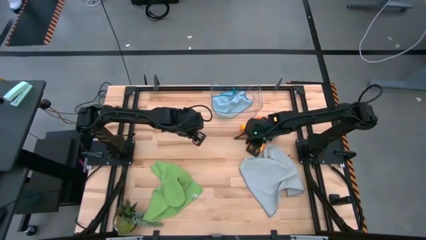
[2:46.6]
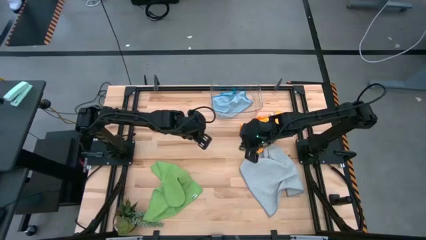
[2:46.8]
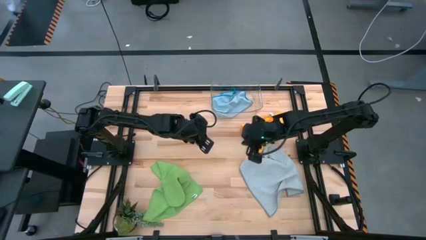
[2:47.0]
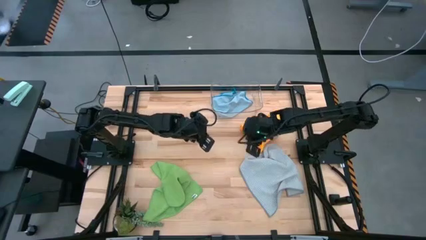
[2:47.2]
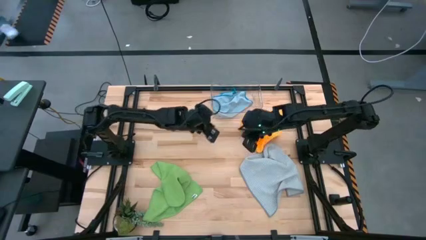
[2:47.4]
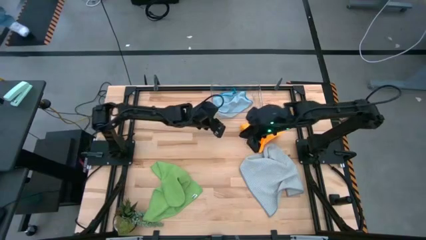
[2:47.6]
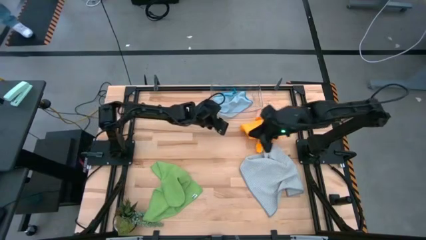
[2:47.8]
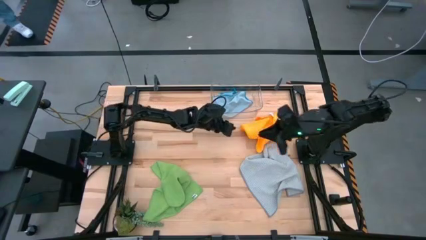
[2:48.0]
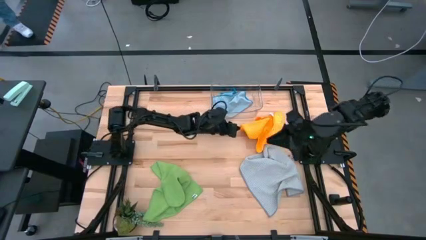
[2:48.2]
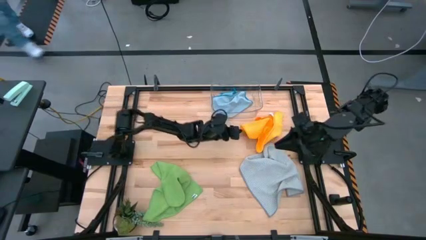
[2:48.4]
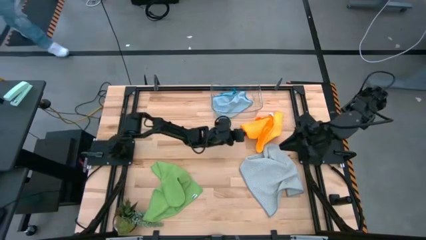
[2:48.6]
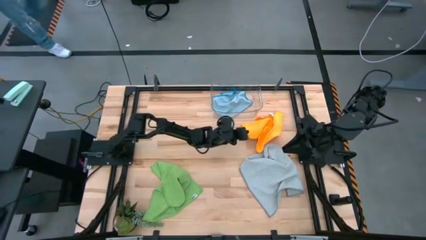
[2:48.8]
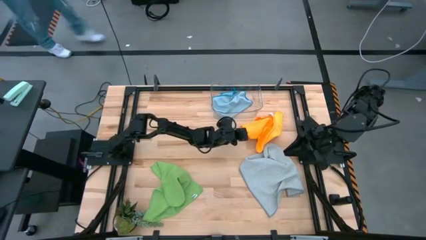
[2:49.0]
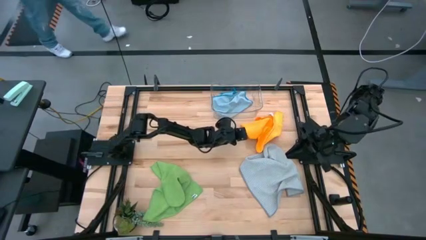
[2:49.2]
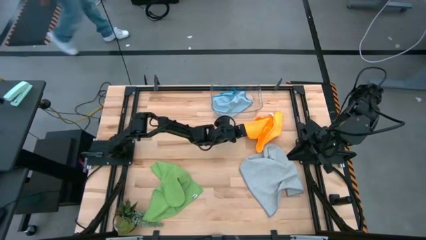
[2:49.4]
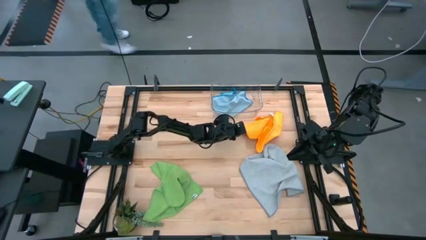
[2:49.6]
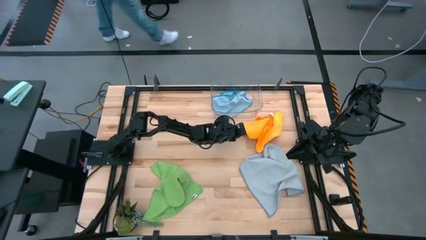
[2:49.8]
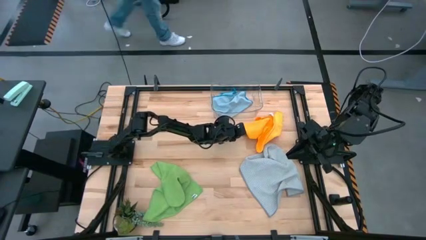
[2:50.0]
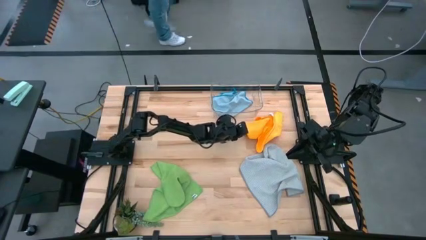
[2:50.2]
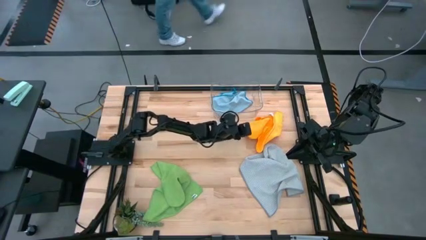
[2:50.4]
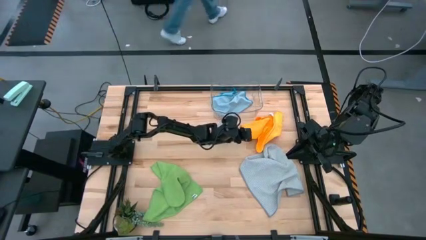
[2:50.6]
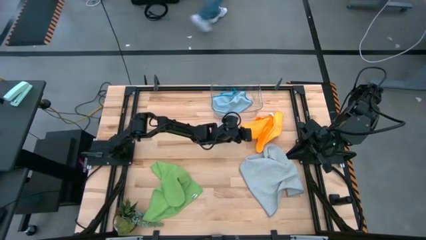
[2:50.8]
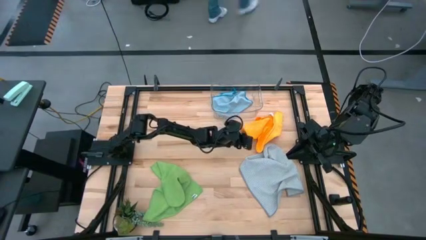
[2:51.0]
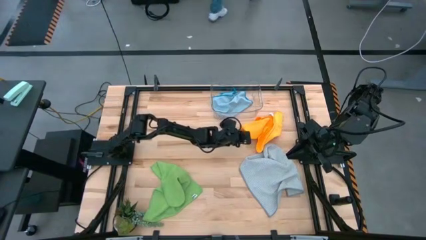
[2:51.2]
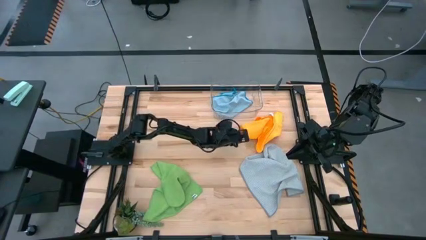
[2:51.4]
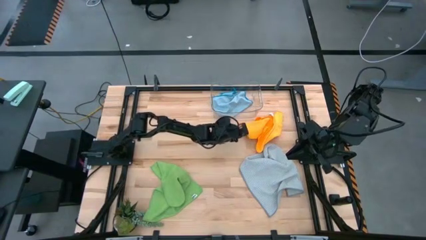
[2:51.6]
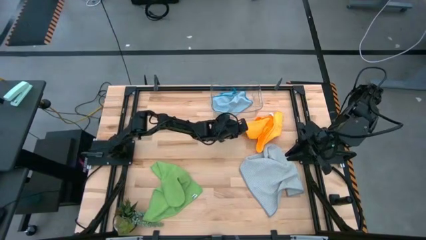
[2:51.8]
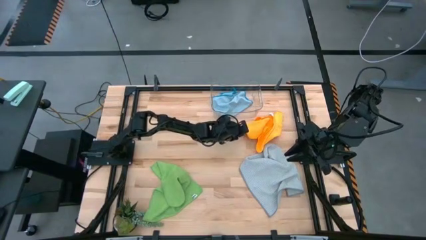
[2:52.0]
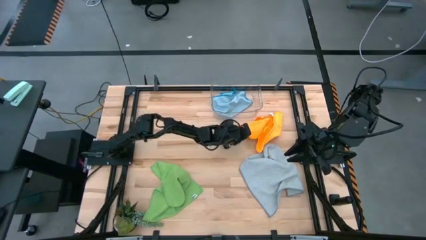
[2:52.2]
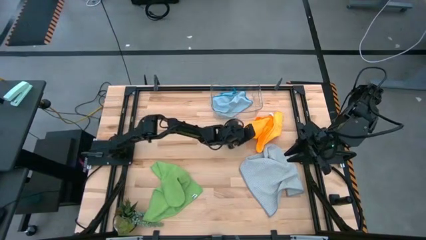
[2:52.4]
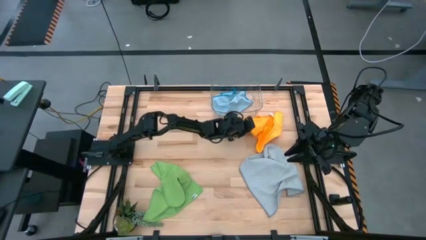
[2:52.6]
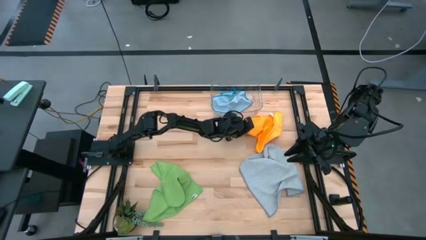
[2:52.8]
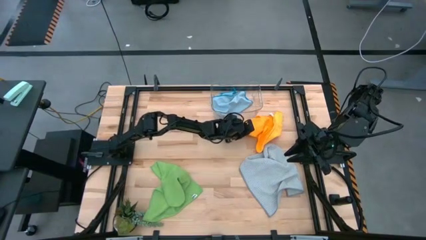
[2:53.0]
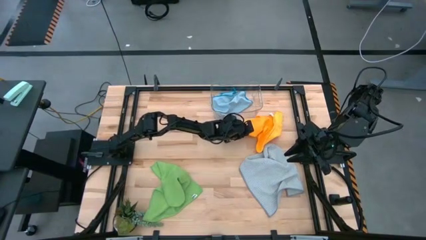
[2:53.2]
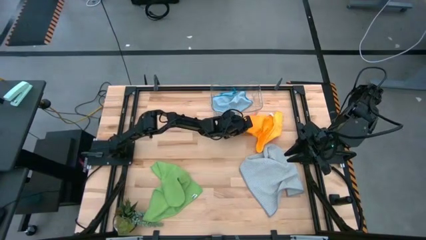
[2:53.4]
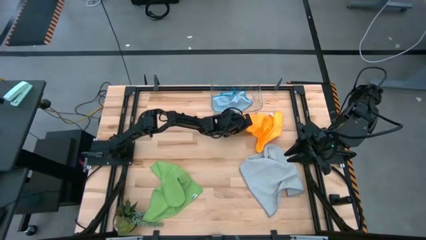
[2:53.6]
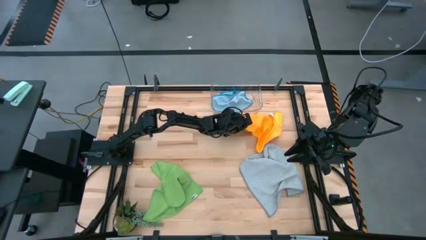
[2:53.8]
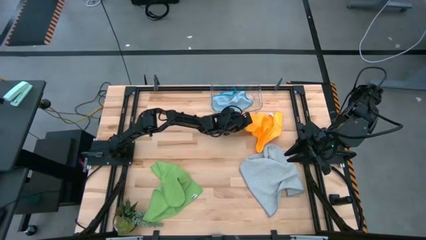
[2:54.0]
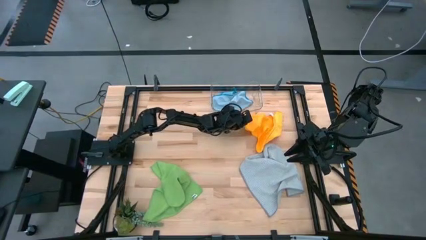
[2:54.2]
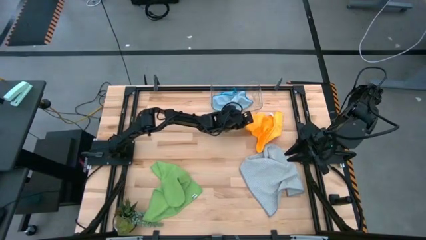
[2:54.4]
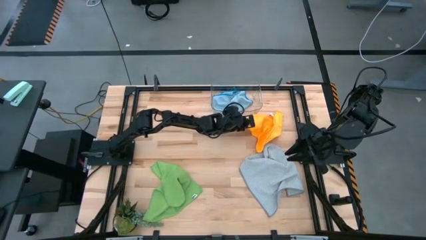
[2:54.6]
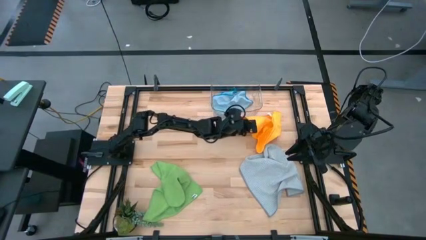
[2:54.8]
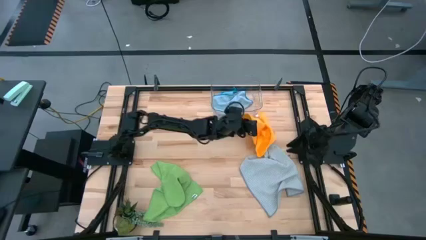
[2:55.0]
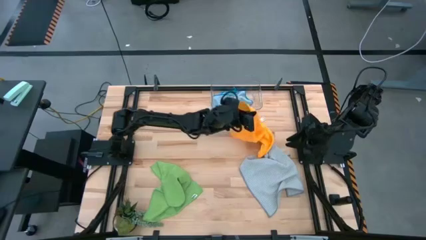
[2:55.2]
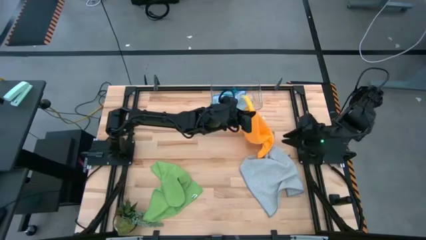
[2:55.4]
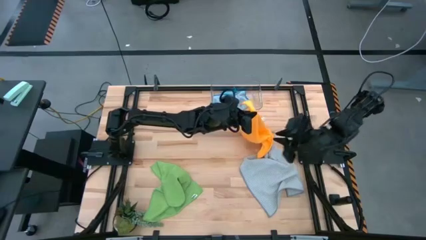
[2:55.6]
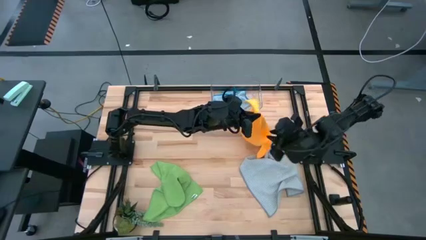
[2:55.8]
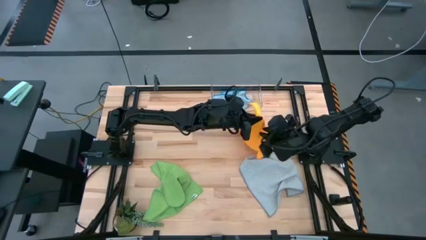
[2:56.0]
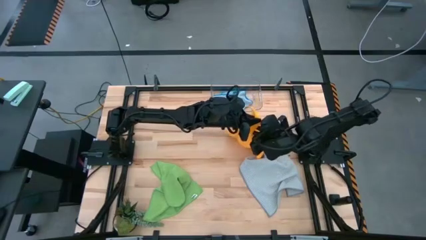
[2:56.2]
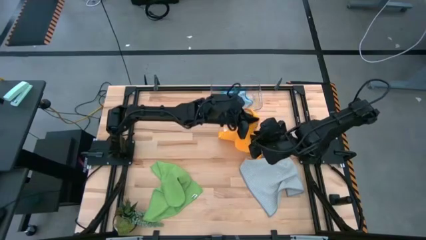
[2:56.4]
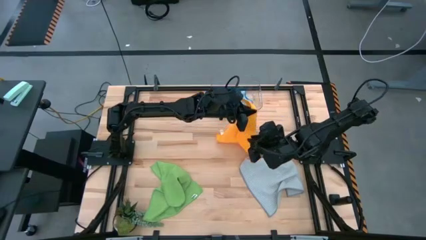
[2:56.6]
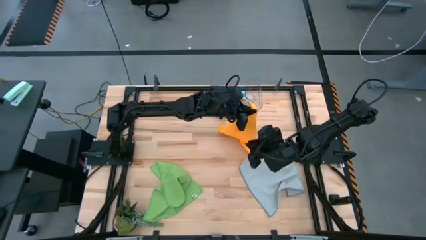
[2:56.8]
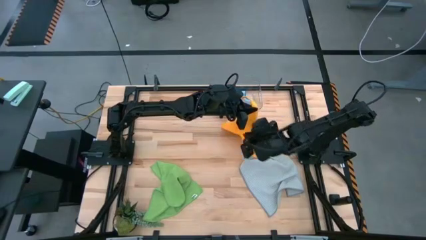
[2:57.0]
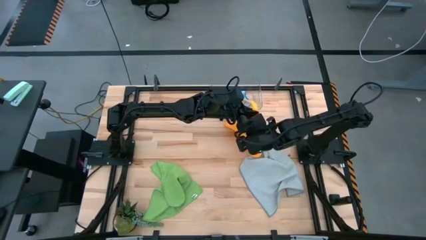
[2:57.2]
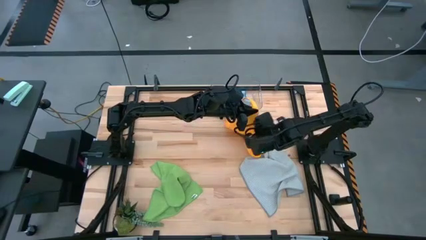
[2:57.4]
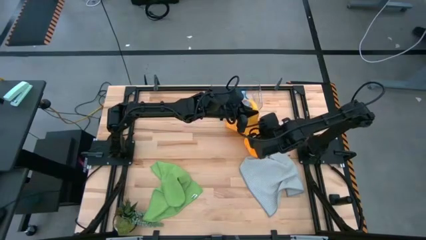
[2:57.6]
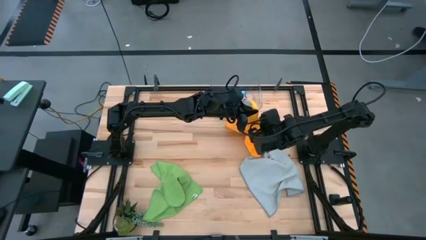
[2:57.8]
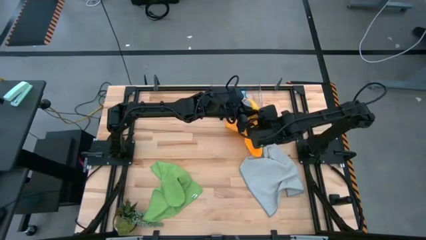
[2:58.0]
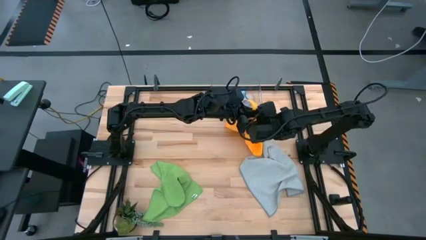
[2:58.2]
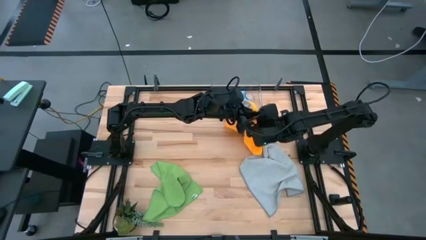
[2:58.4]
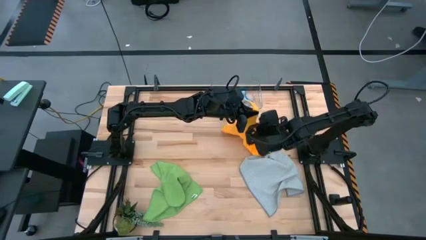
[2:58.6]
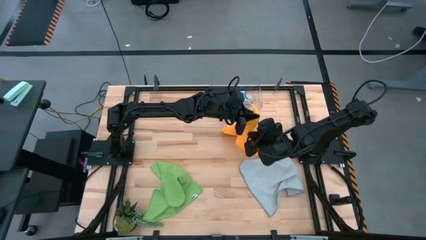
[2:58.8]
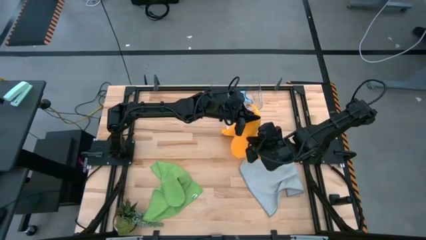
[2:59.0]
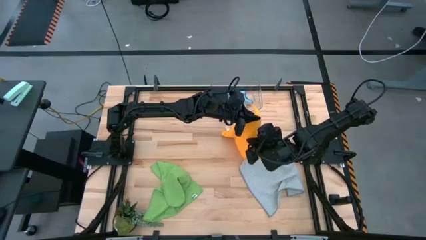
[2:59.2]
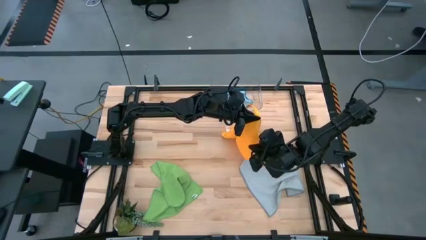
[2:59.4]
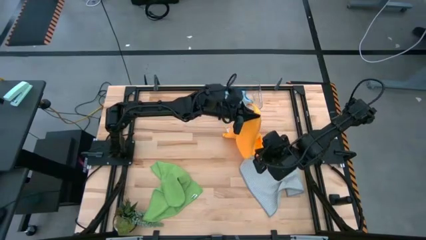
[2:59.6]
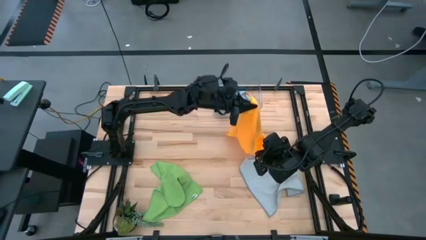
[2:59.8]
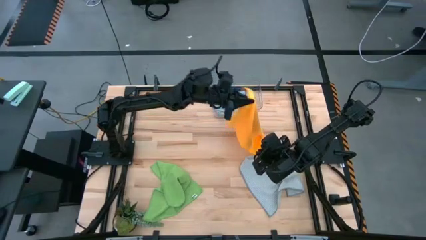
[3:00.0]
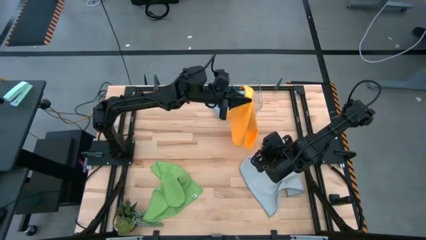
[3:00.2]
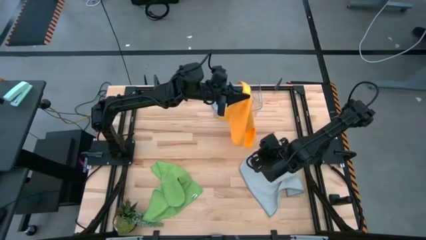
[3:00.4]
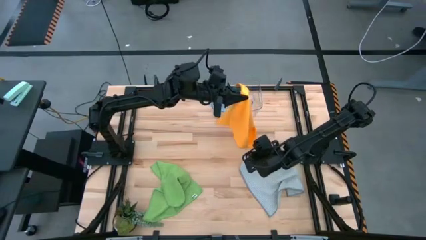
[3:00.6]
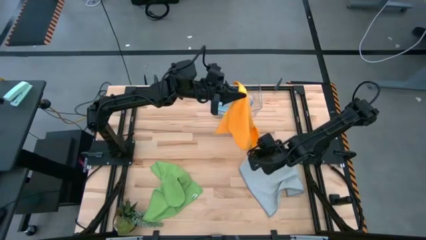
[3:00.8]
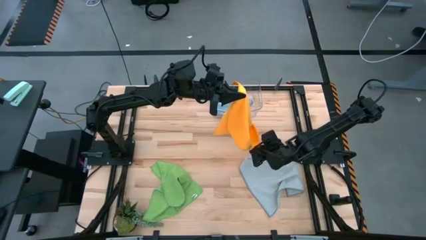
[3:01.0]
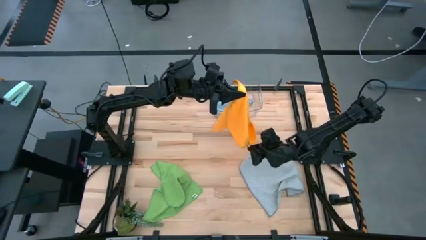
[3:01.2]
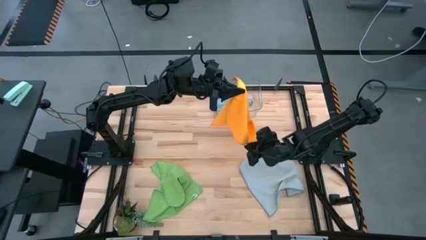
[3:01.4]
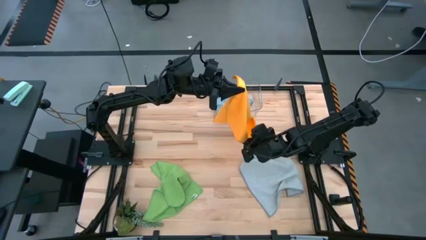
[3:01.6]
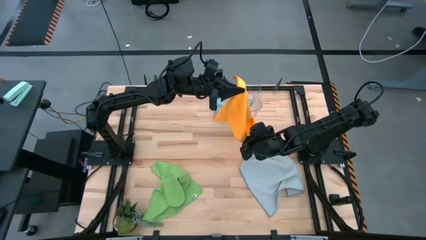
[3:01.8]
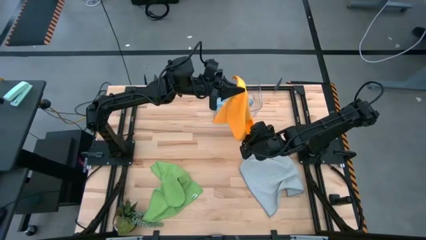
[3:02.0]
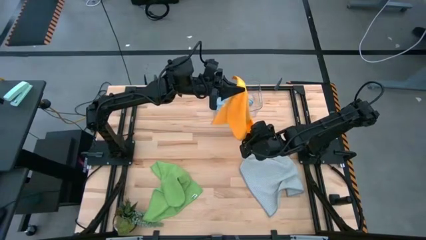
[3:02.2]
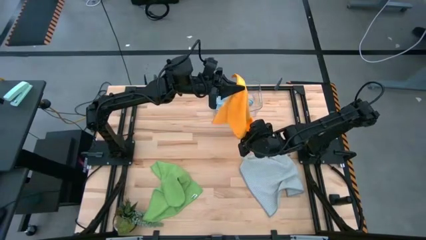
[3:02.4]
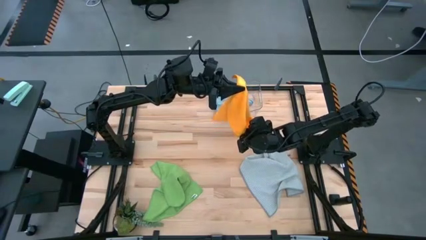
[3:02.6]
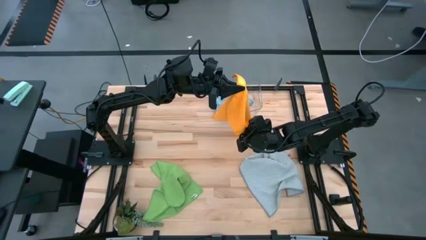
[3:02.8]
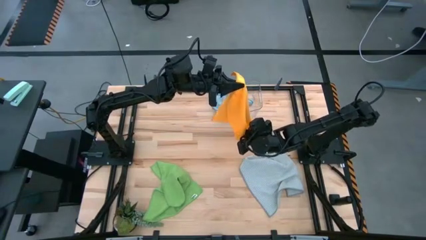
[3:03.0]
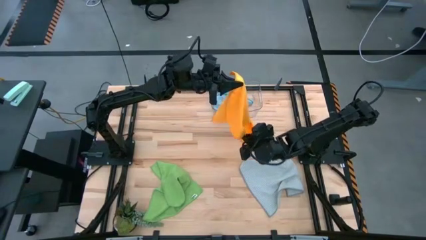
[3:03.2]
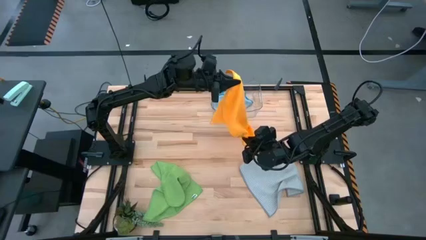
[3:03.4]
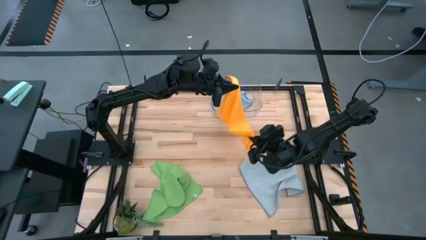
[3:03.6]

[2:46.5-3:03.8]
Task: Fold microfiber towels
Fold the orange microfiber cloth
